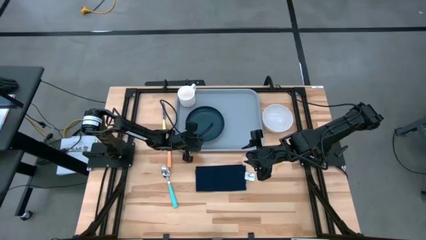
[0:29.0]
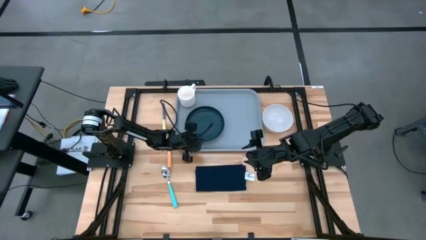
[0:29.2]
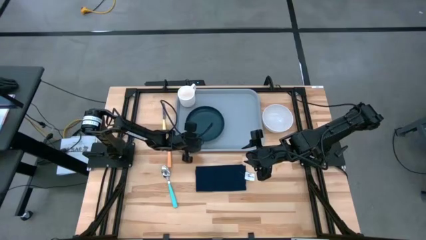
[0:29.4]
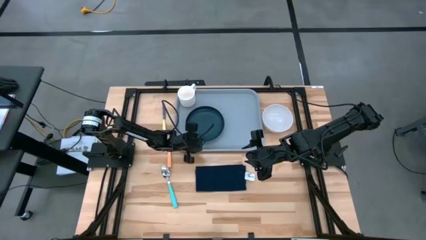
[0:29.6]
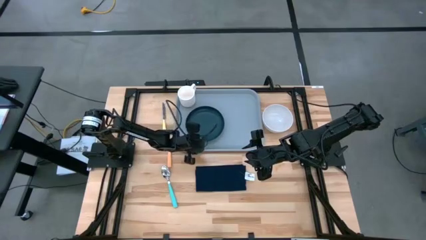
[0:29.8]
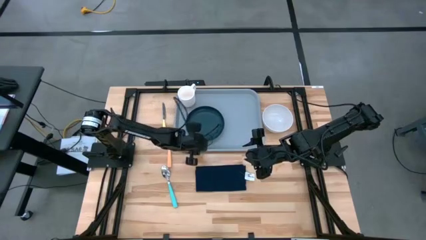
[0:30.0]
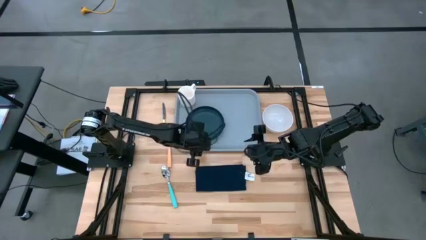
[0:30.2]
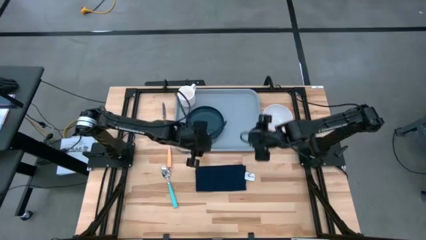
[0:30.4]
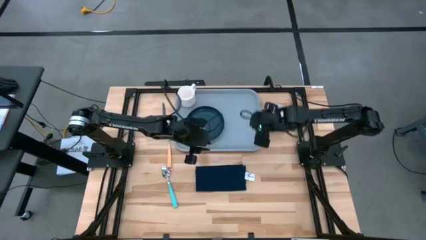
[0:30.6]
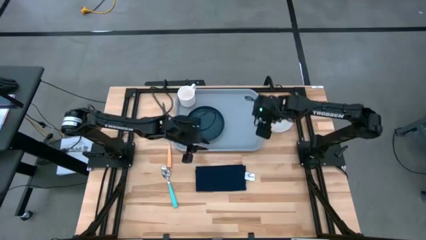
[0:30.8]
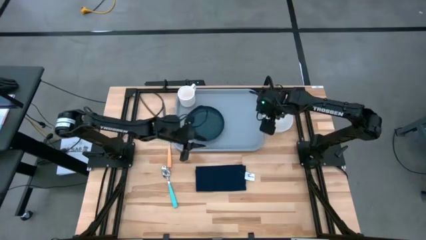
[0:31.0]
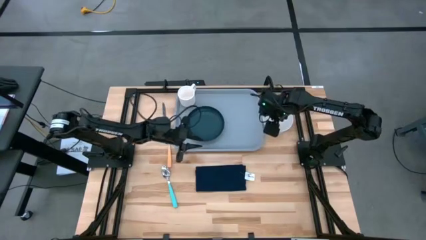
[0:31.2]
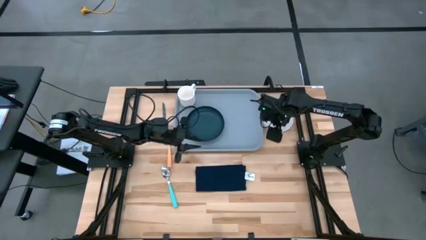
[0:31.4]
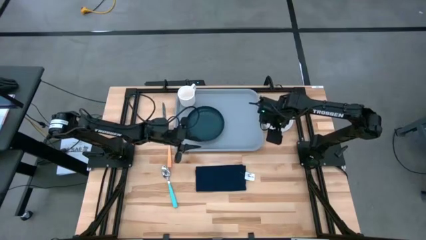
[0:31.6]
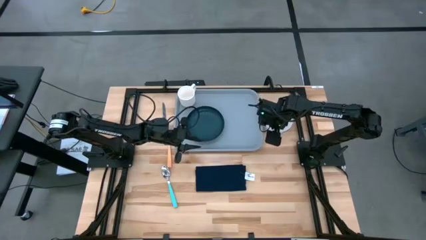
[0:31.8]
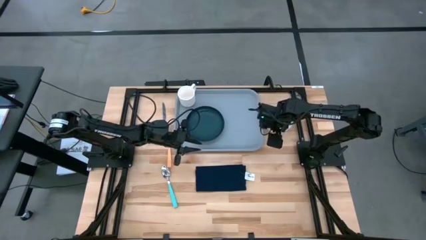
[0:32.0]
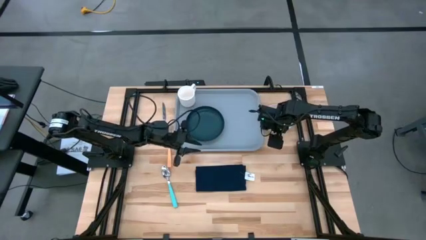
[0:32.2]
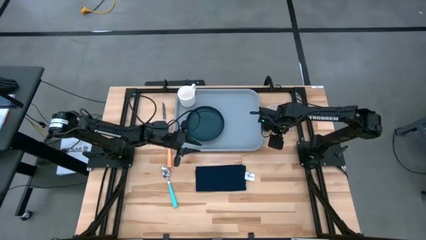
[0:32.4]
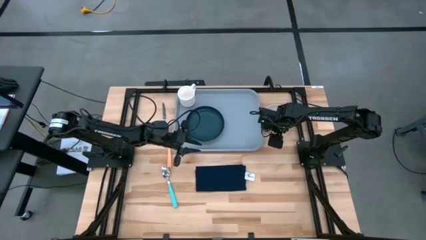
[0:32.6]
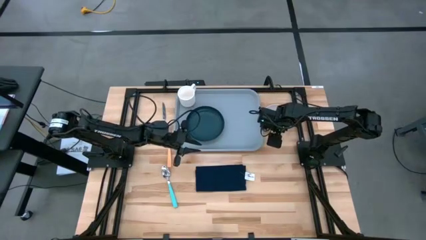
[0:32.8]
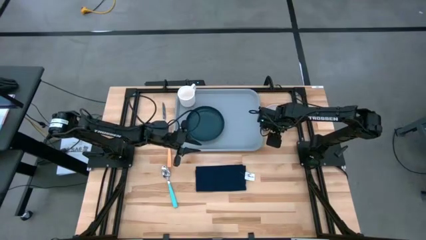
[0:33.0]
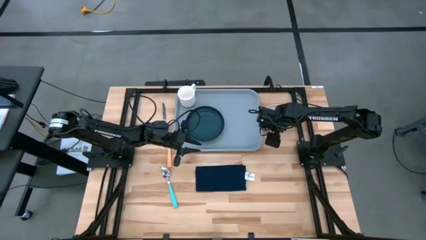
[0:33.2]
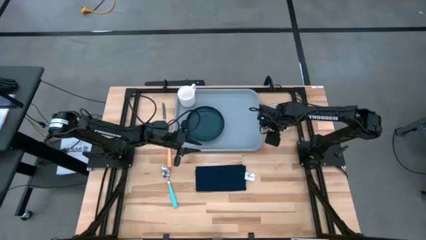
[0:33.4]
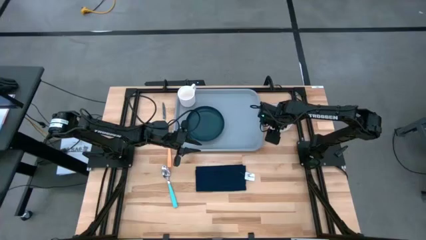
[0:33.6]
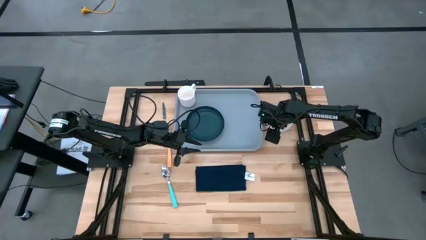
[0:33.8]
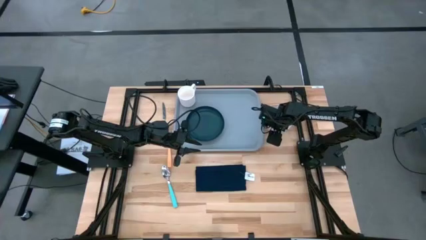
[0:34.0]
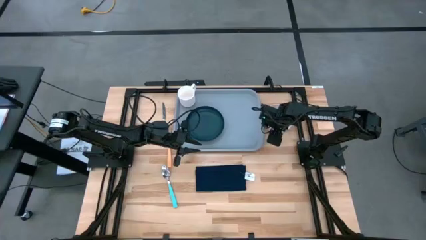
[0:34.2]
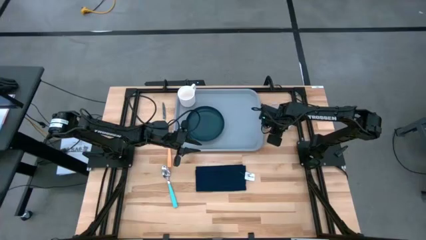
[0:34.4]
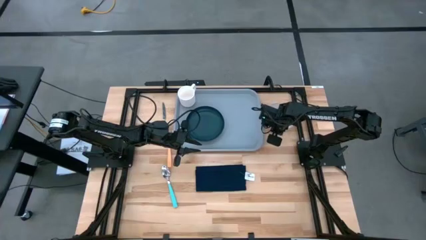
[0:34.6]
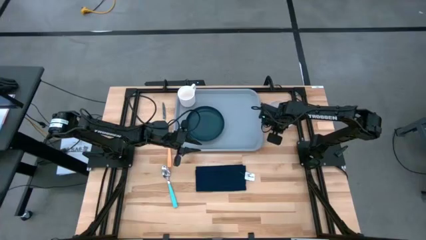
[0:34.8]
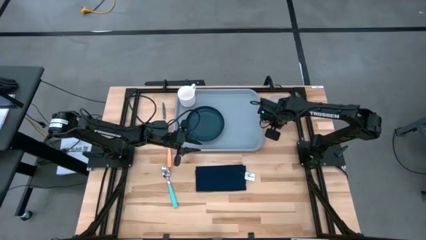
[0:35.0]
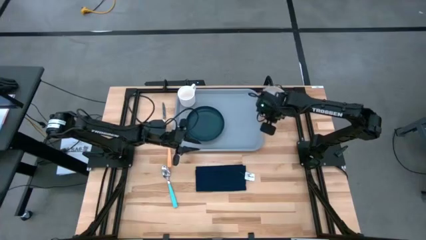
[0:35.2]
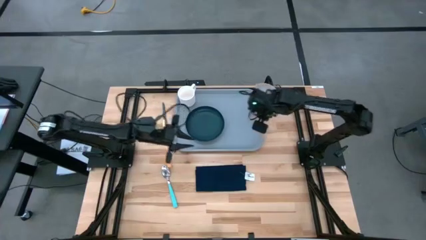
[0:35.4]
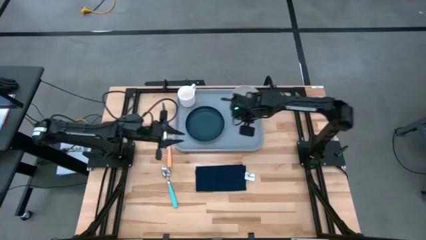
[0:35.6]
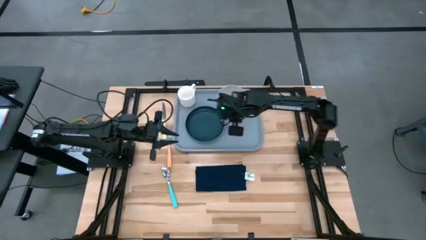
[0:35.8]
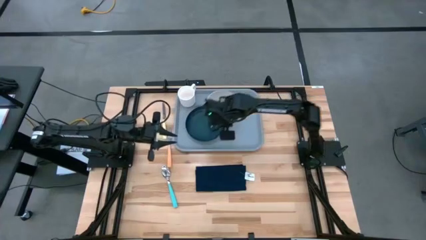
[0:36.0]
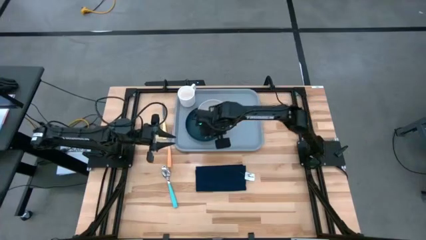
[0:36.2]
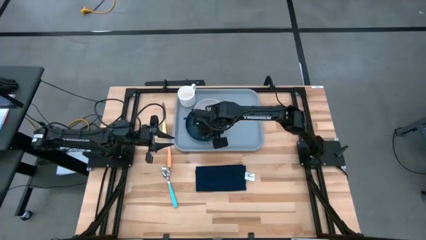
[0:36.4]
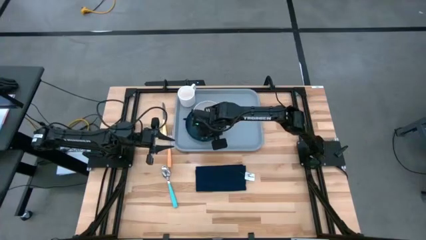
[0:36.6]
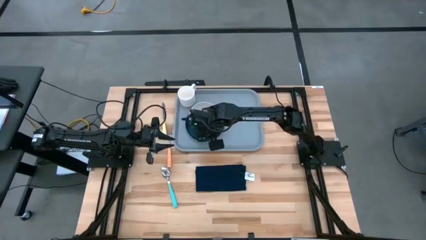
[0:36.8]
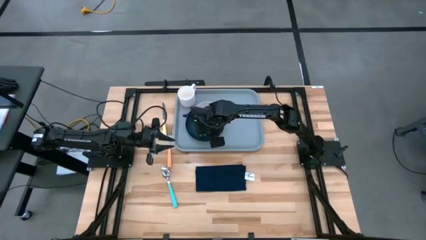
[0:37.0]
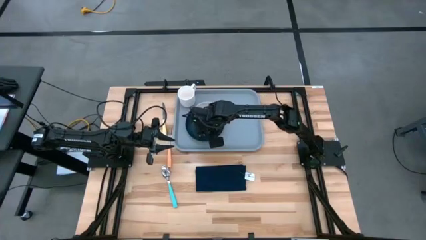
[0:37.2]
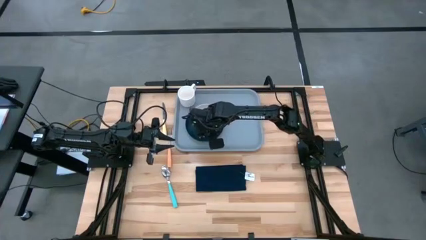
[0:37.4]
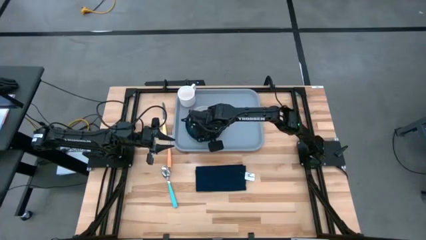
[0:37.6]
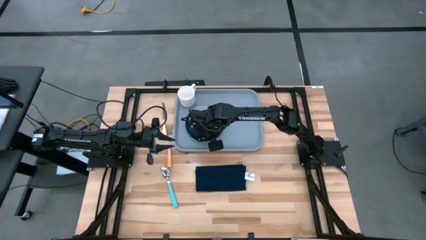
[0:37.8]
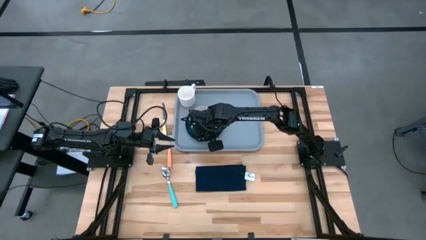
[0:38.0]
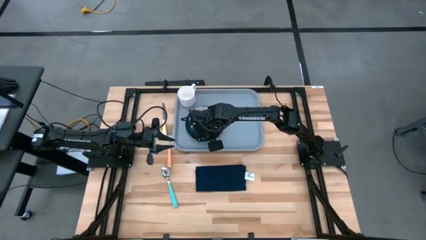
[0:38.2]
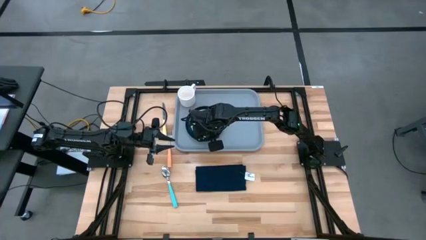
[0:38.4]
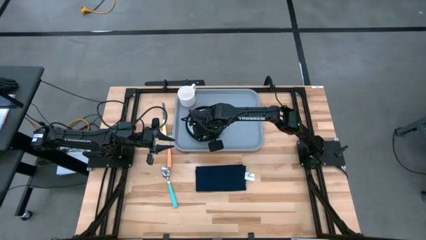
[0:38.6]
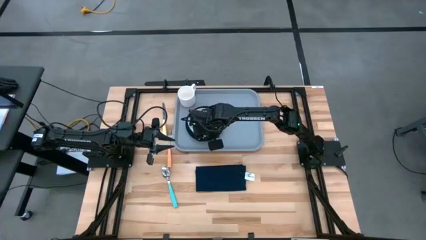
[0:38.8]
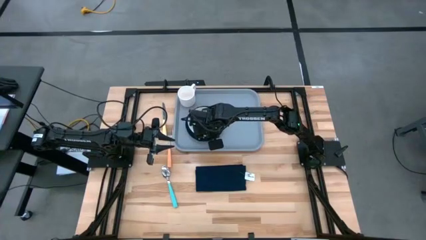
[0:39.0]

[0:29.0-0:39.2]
Task: Set up tray
Stack the white bowl on top of the black plate on the gray tray

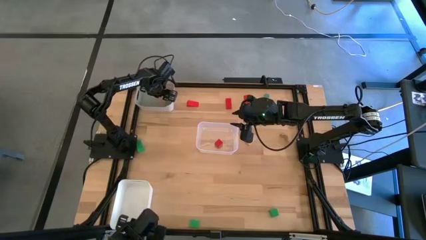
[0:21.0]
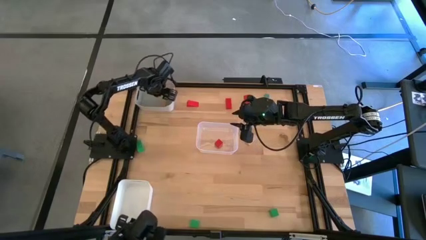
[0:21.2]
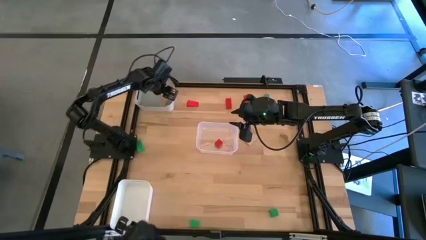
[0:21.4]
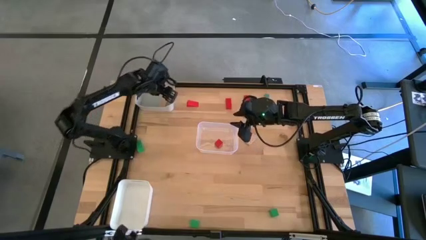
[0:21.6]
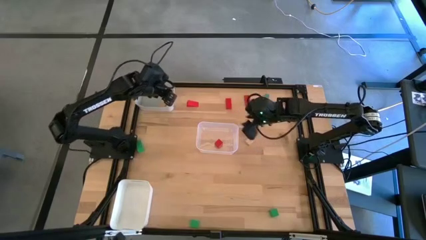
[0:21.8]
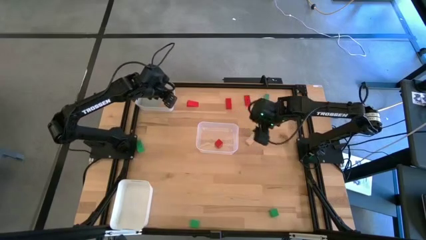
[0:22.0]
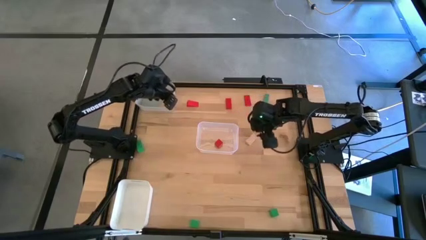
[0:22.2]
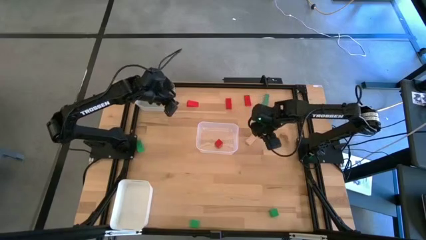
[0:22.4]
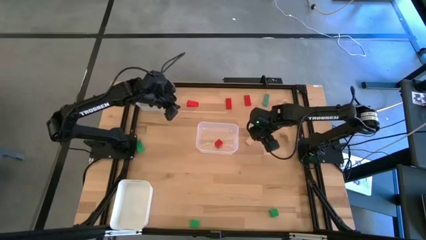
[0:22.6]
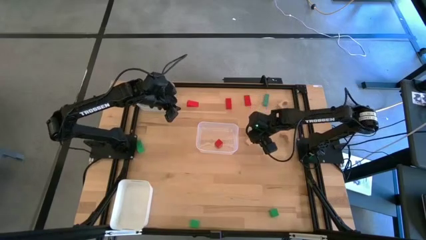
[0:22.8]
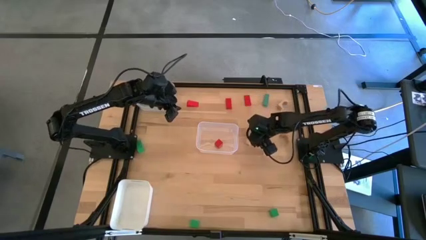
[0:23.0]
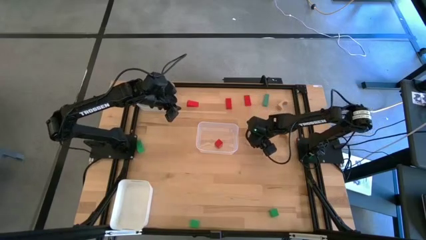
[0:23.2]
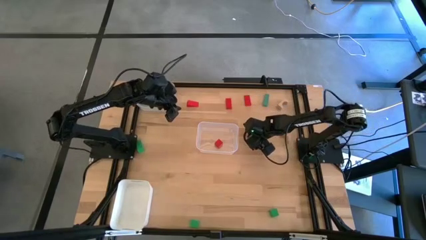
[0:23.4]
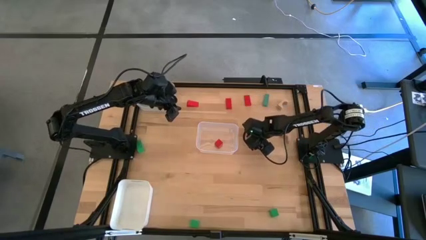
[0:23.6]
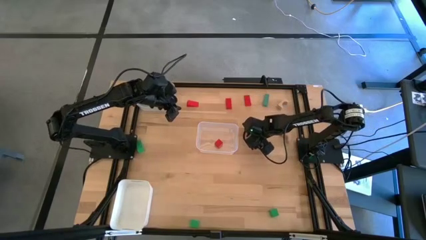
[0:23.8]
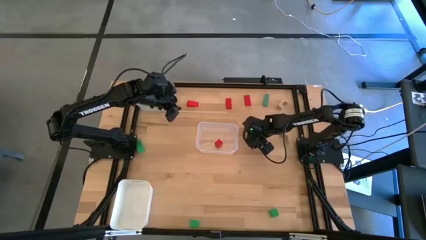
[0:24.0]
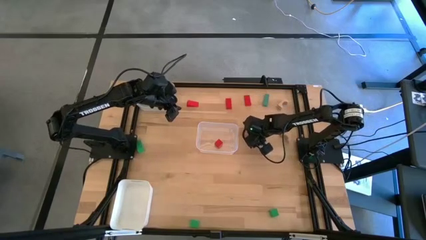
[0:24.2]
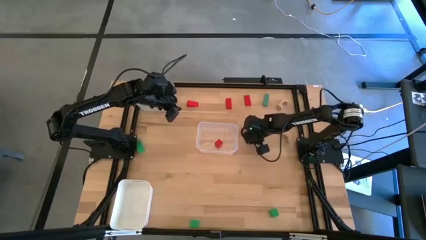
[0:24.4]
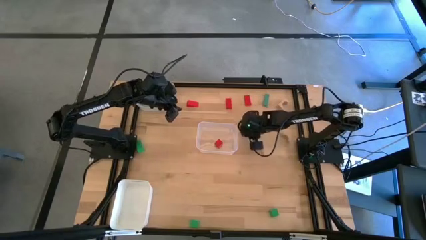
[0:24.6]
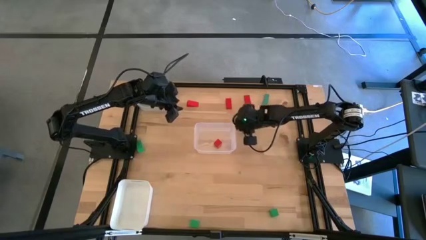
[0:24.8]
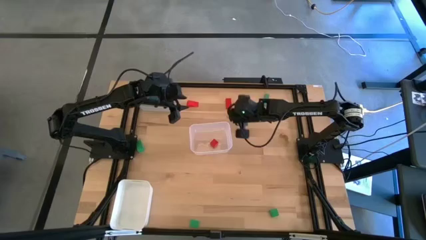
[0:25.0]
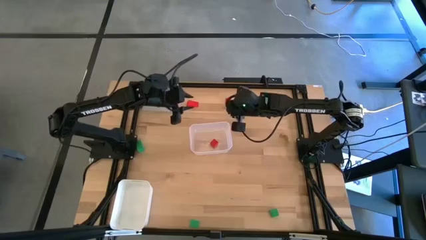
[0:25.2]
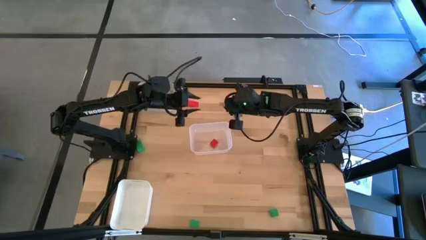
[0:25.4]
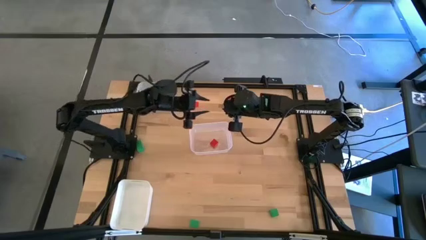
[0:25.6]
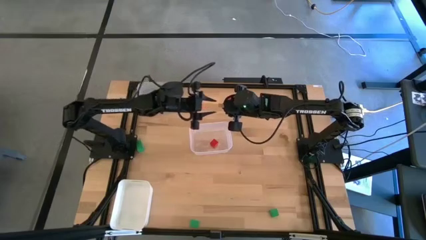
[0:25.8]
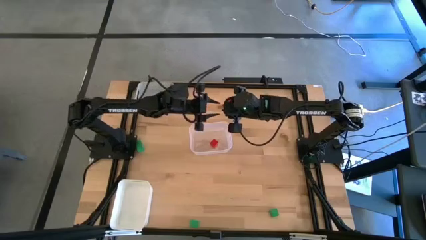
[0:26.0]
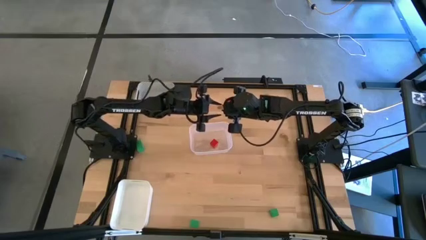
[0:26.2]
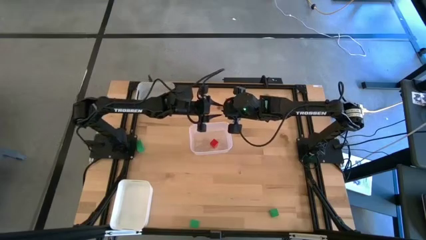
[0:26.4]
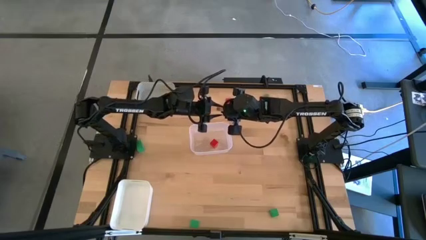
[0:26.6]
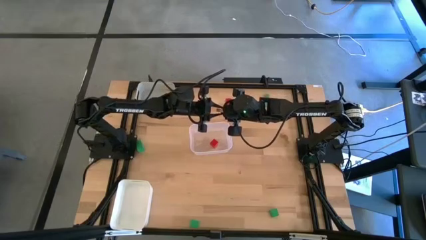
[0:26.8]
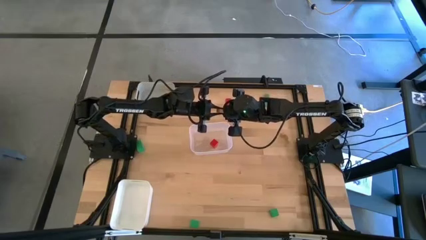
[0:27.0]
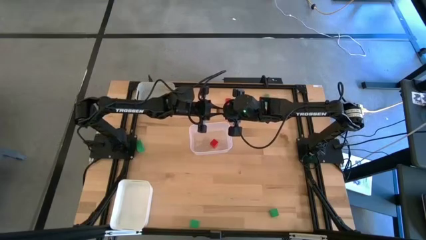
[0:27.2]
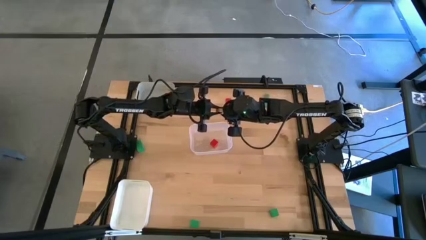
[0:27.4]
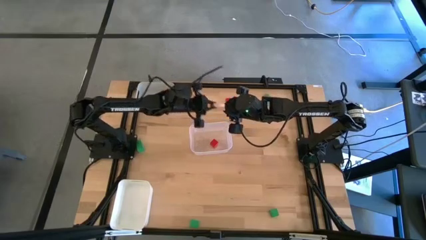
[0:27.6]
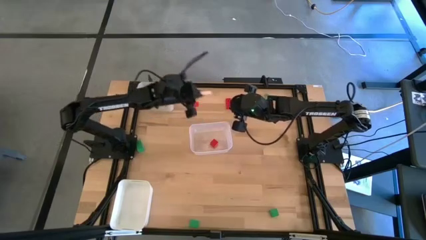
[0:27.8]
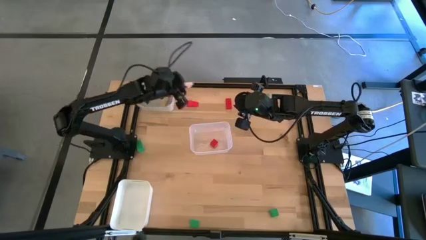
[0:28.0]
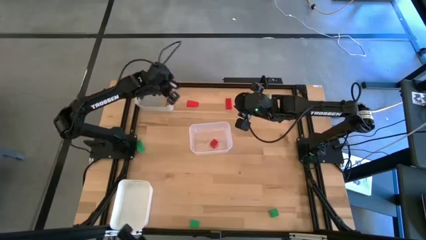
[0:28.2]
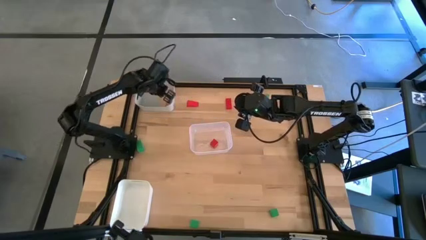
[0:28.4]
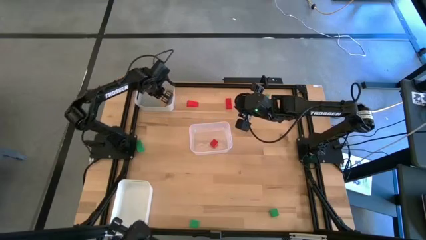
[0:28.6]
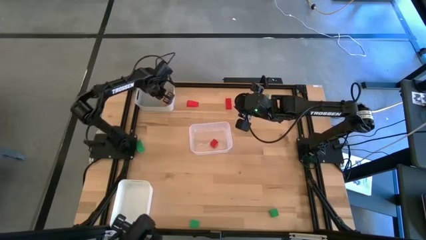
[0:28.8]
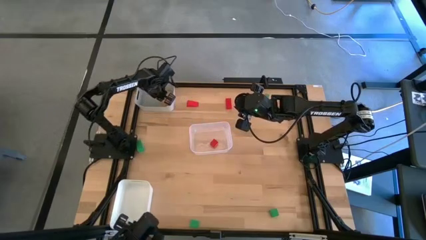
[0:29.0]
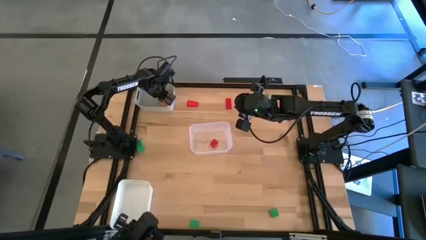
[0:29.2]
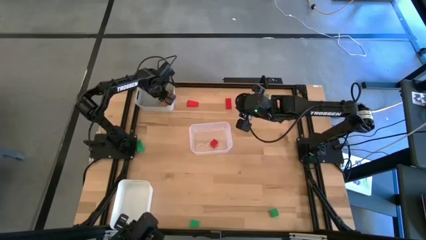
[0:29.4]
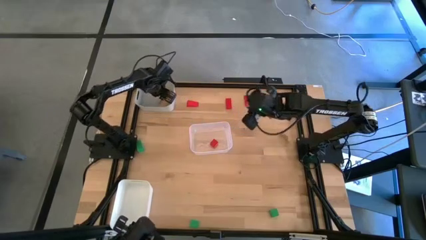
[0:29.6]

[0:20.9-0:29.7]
Task: Sort & place blocks by color
Put the brown block into the gray bin
